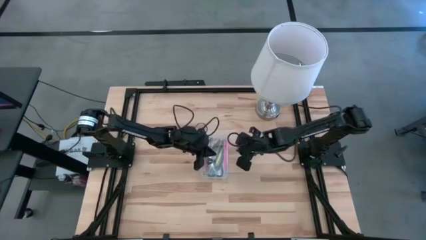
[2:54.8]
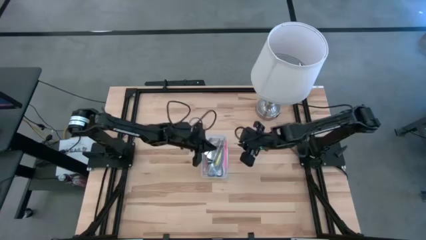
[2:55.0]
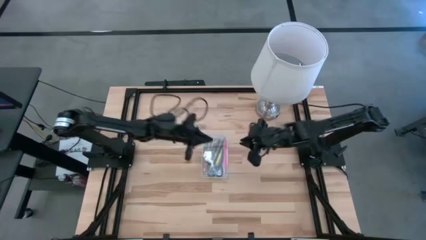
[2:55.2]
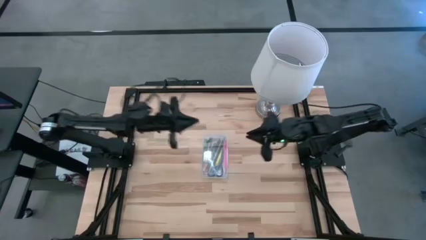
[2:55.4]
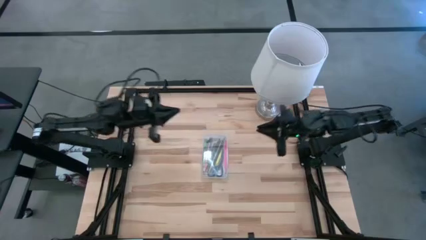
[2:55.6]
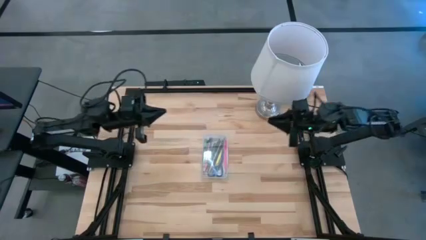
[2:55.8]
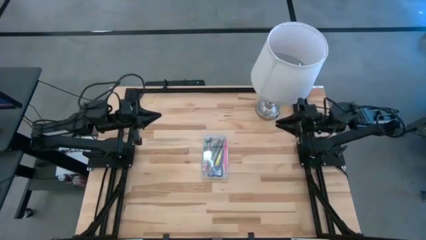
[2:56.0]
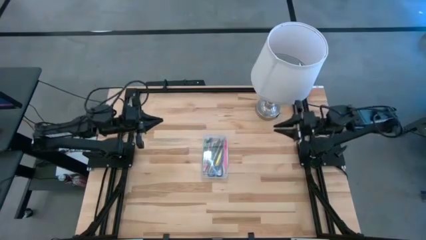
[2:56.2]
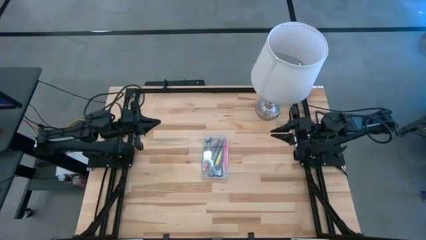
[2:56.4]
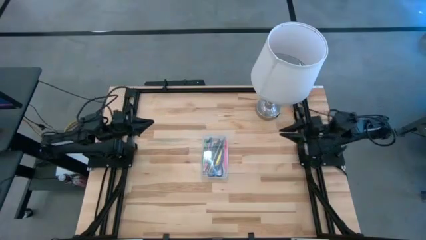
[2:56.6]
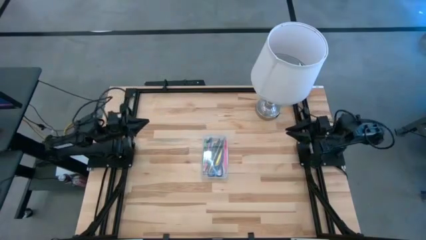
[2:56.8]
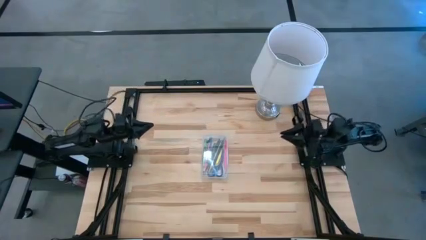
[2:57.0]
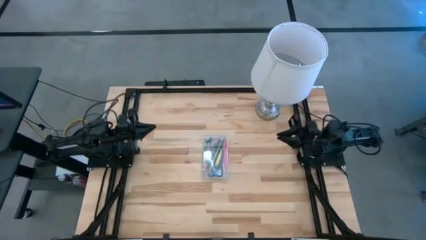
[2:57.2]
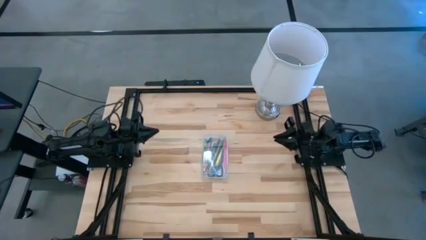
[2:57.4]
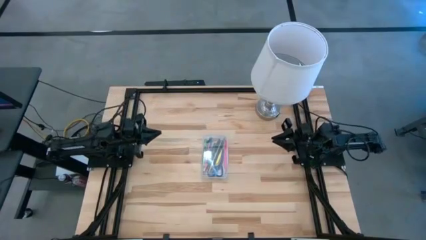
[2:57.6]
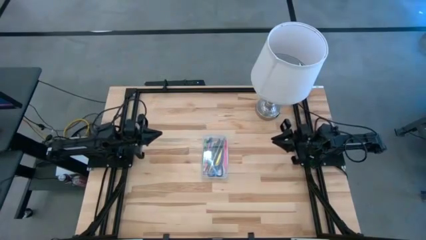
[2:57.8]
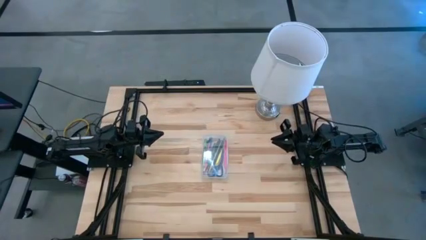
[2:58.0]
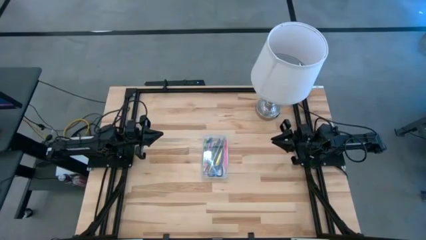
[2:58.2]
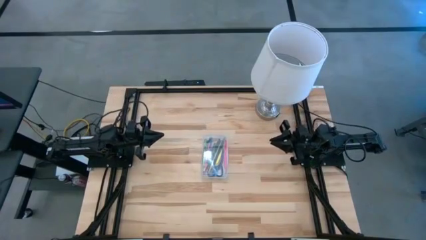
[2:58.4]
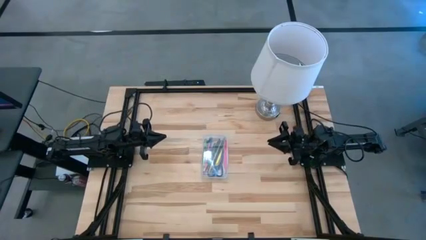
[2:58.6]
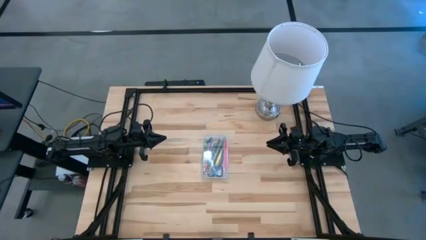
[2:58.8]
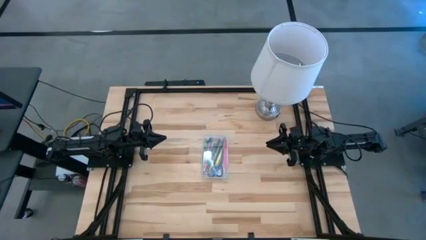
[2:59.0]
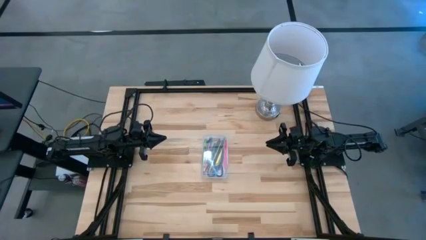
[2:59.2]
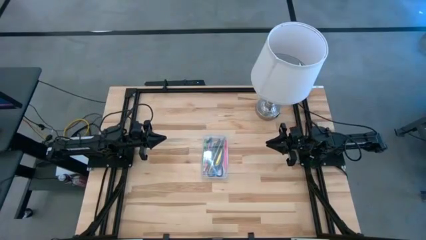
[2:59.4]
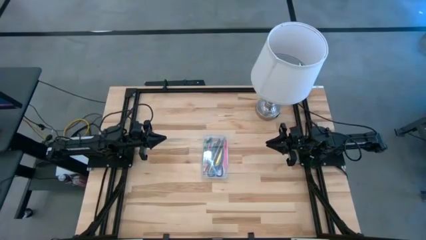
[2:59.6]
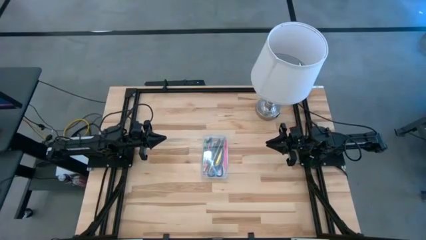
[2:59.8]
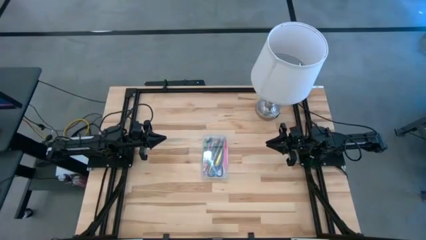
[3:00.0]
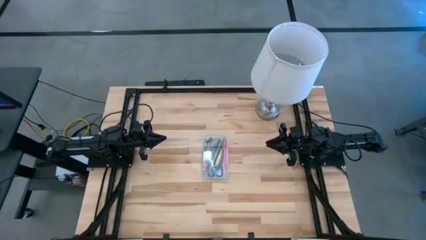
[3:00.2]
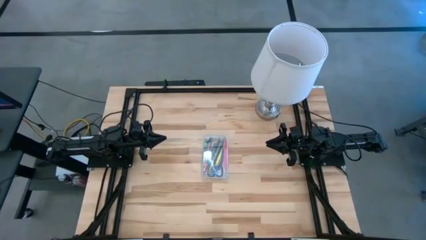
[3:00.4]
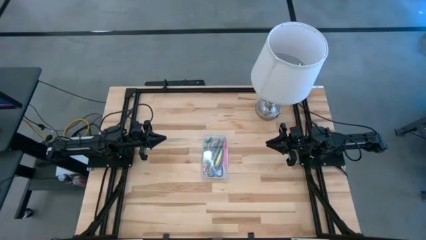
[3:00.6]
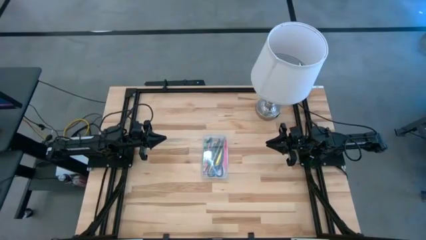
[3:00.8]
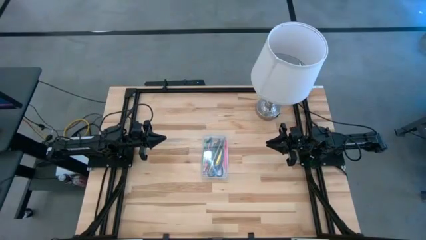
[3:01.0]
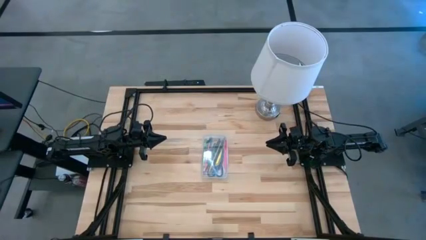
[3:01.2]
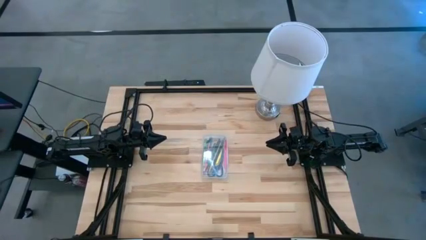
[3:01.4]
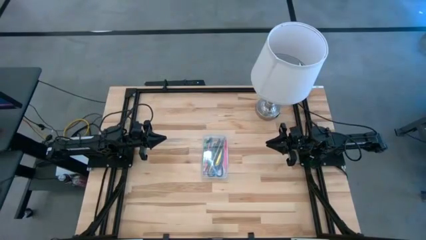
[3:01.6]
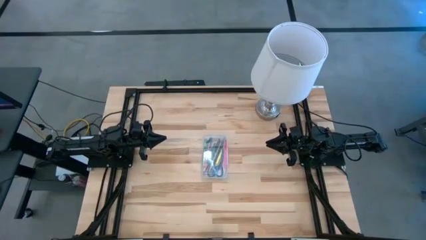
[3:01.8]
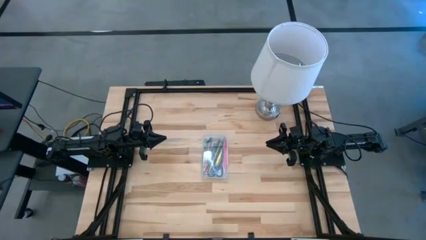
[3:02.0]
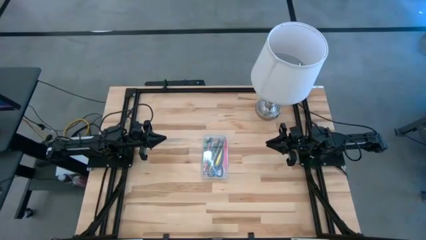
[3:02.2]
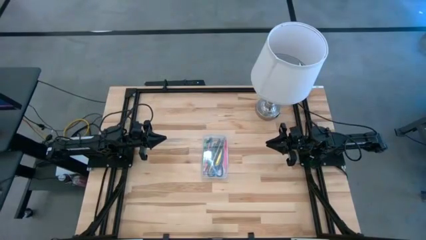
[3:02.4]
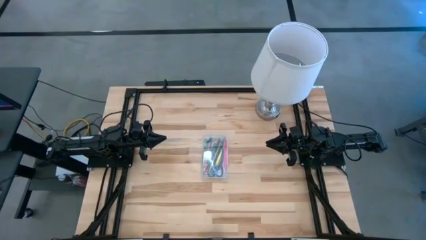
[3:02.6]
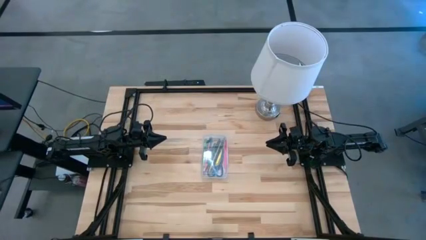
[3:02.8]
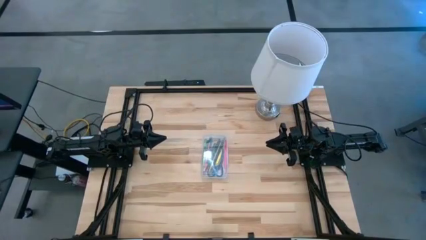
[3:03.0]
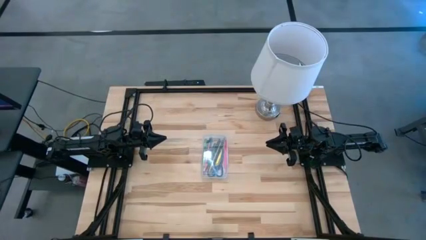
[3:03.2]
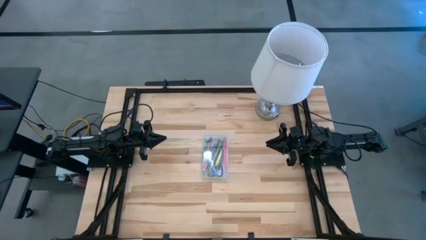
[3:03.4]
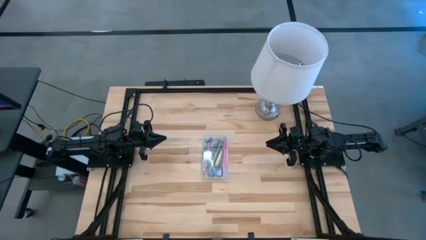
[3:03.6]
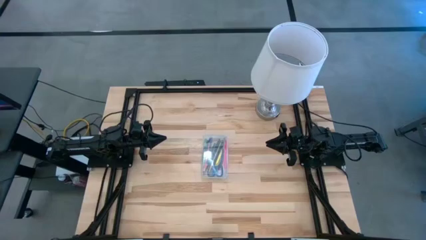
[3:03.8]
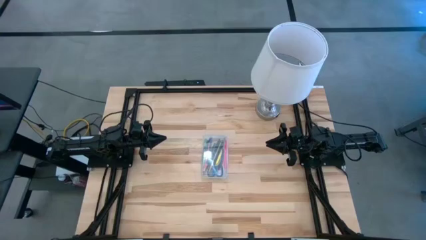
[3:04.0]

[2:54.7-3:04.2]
Task: Pick & place school supplies into a supply box
Return to Home Position

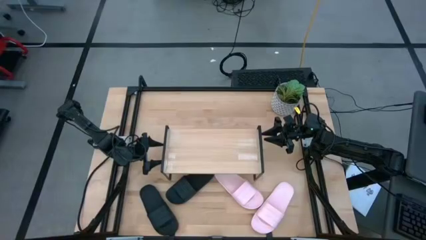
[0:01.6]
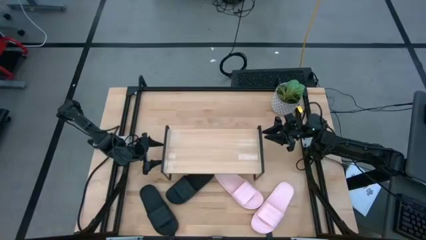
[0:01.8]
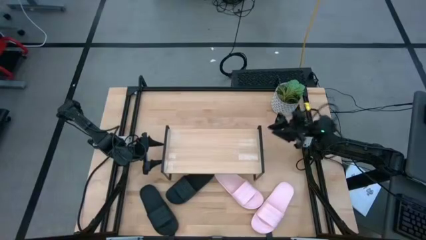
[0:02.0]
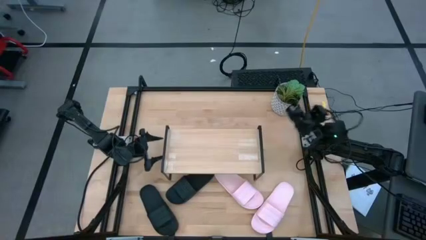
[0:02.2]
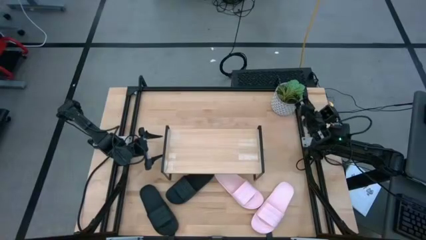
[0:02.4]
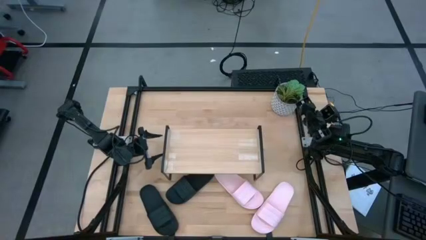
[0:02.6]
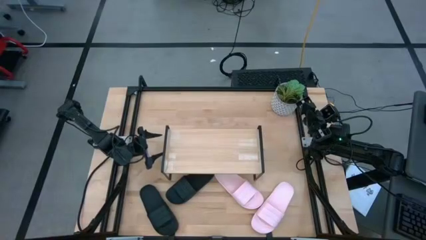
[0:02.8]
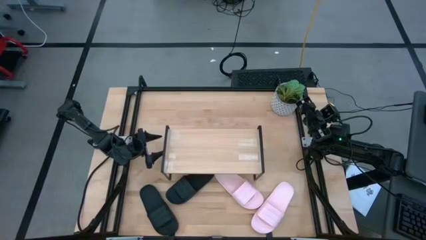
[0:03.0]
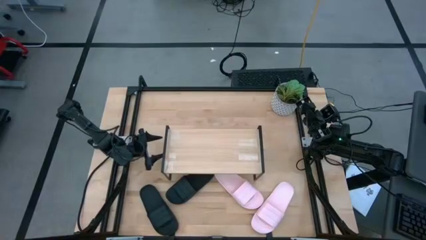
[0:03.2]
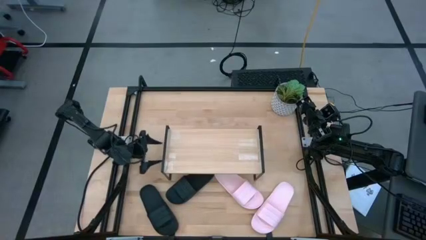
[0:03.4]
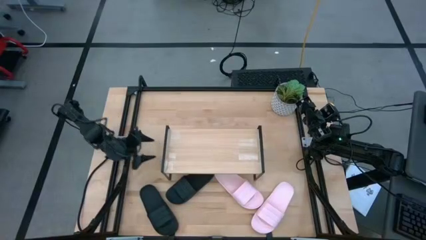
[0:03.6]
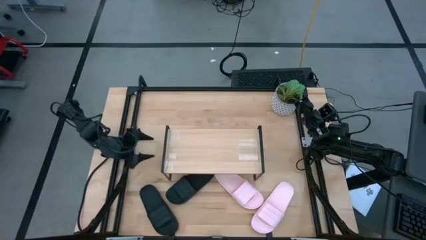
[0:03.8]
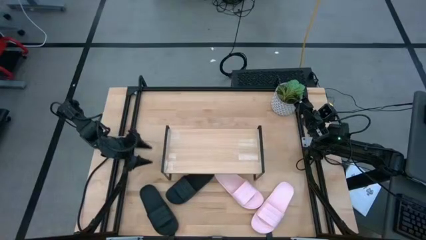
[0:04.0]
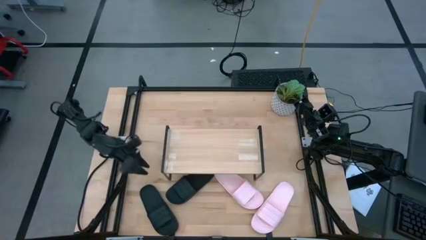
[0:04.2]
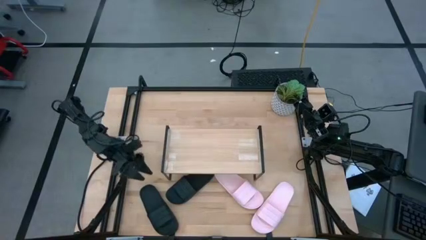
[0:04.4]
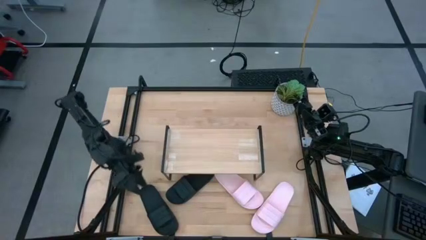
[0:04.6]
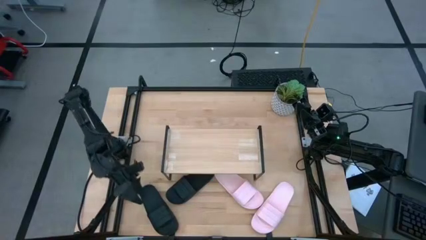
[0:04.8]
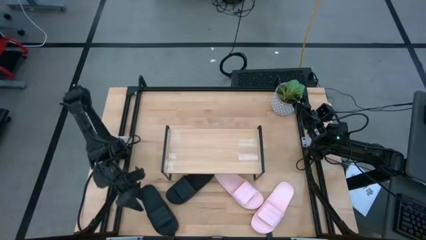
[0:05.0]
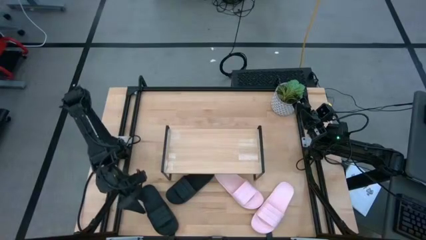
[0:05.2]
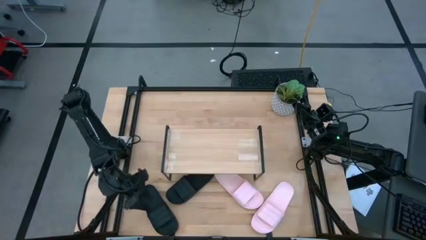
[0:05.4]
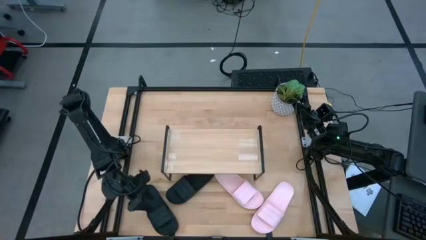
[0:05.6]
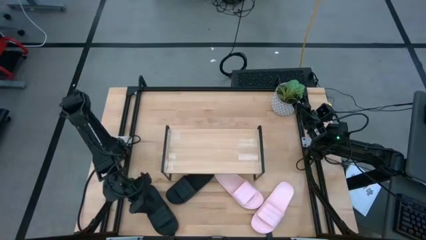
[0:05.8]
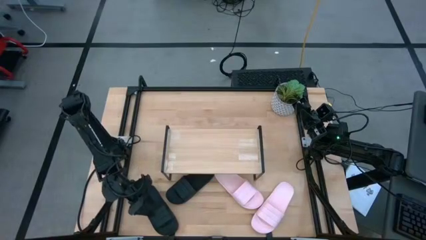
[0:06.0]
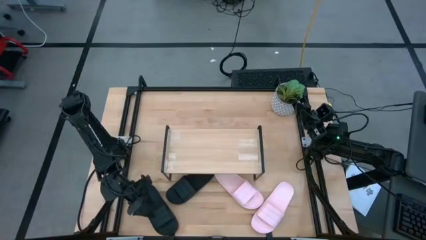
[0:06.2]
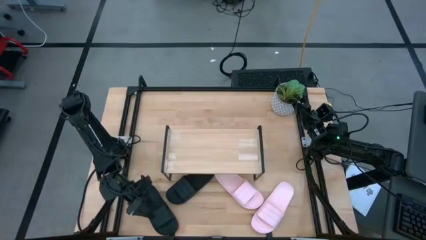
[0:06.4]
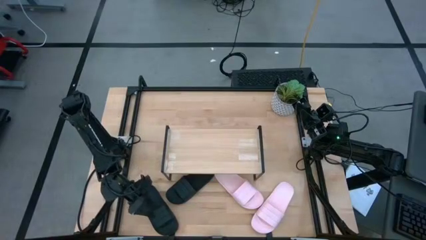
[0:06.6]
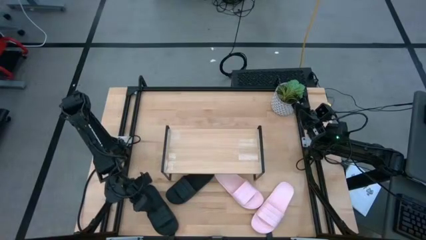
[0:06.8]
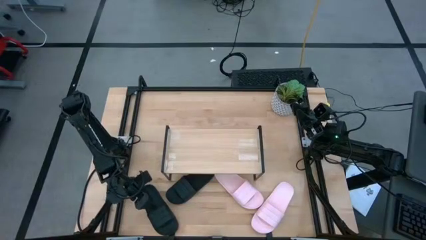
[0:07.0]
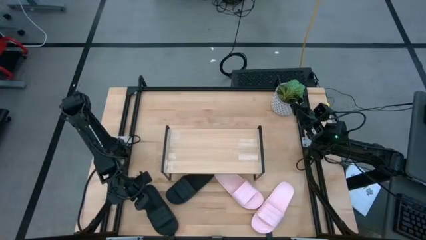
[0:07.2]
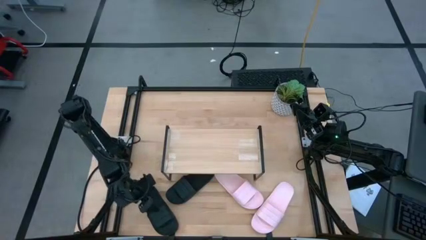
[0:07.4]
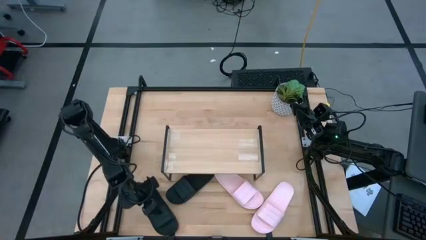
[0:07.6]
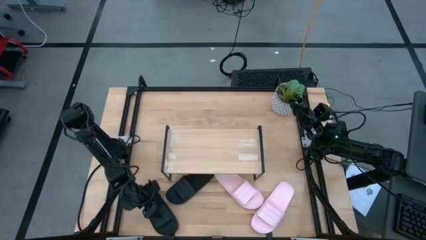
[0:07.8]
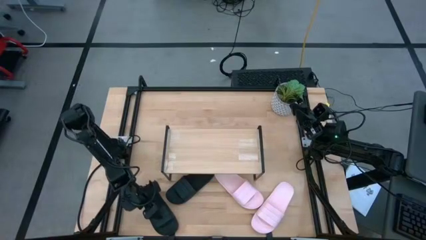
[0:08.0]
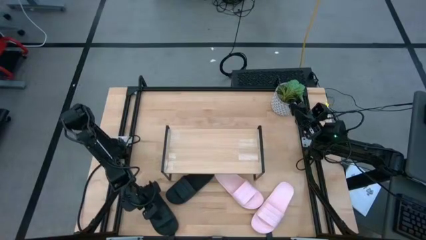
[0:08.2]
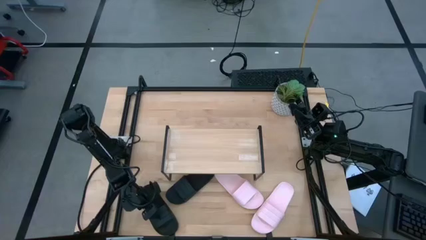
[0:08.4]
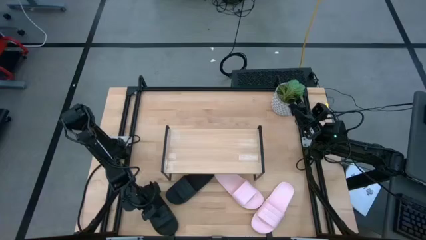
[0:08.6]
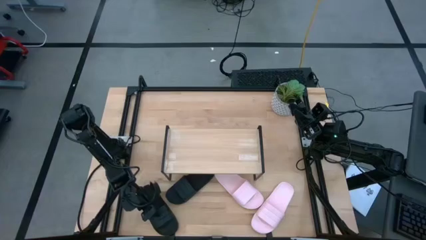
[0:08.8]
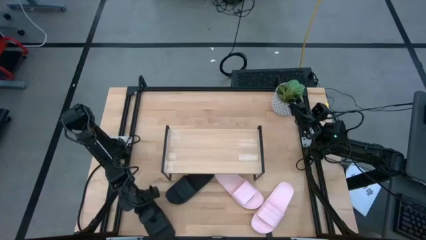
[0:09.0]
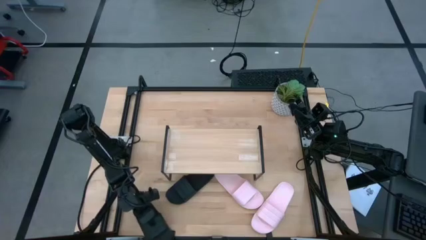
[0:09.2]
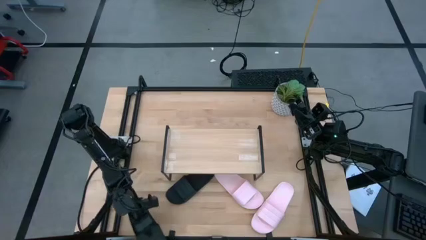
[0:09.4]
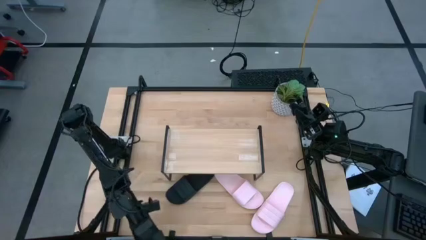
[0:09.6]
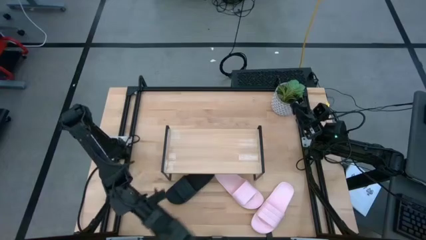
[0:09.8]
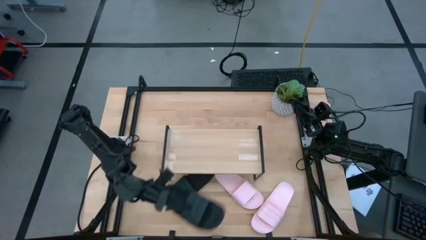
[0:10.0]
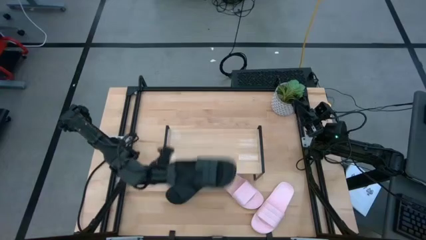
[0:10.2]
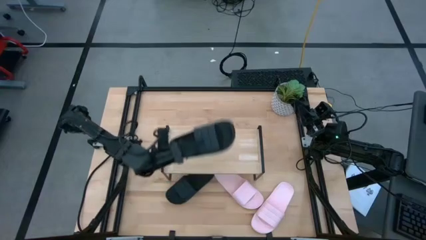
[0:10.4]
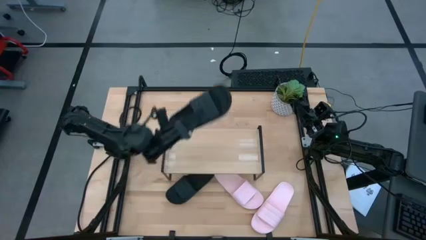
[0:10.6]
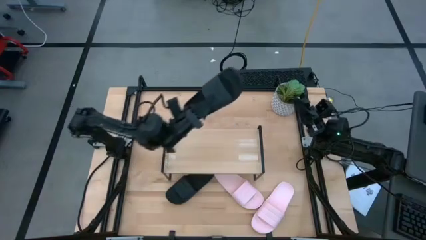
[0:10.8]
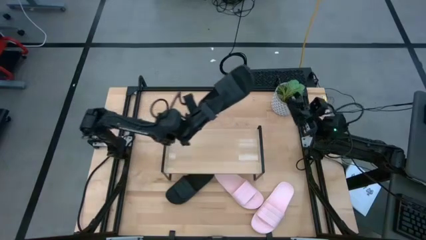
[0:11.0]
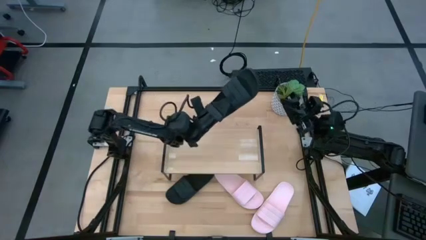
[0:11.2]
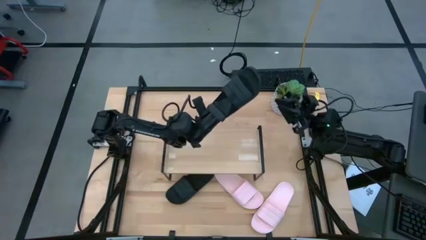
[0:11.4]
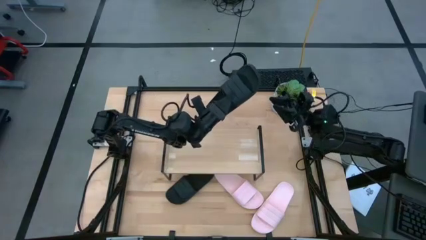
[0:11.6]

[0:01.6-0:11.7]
Task: Pick and place slides into the shelf
Put the left black slipper on the shelf
